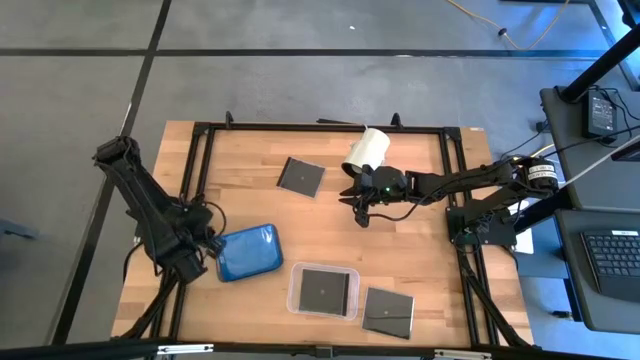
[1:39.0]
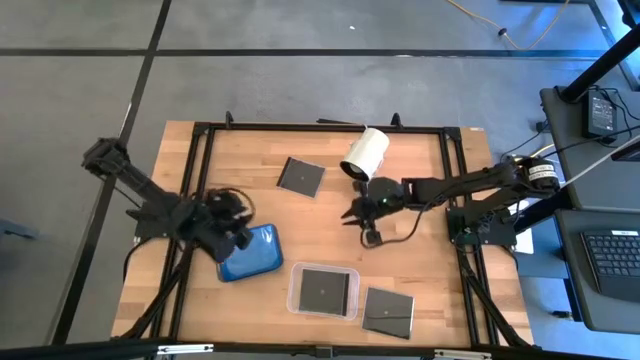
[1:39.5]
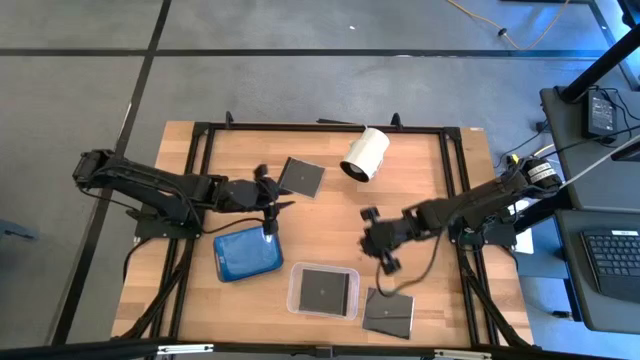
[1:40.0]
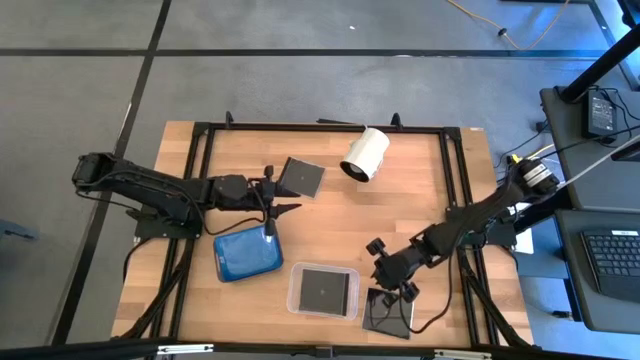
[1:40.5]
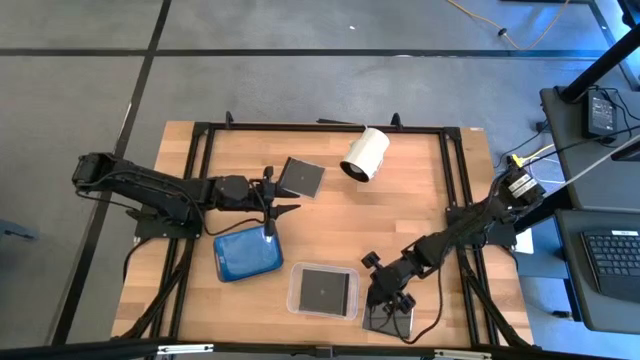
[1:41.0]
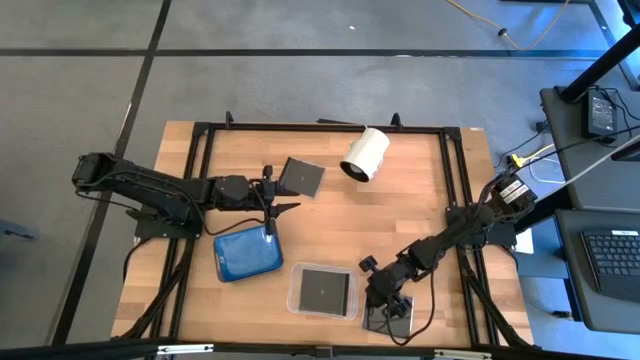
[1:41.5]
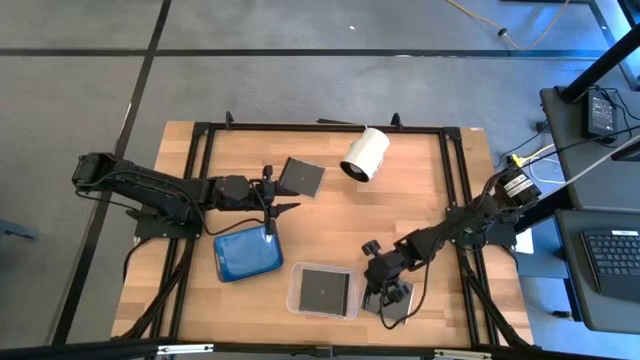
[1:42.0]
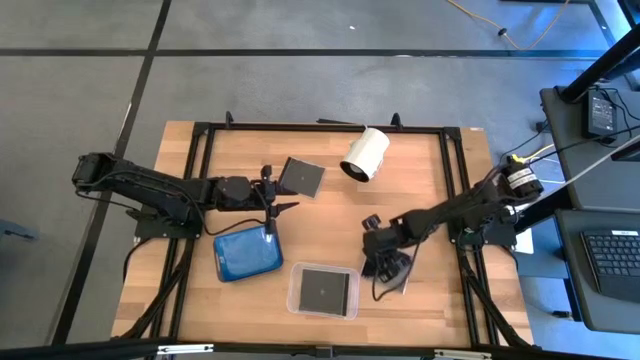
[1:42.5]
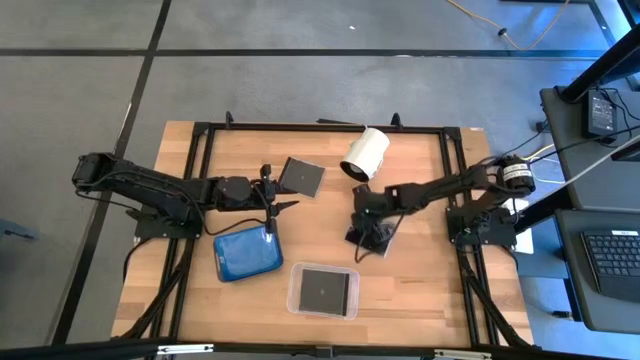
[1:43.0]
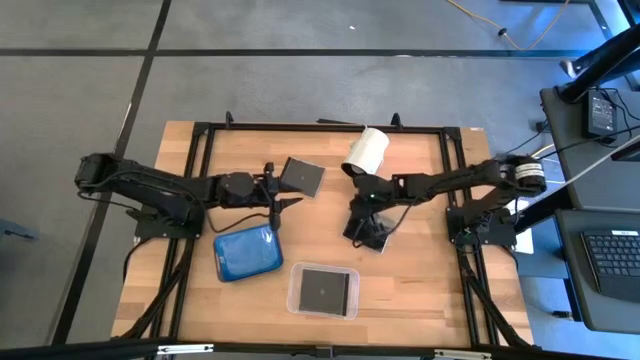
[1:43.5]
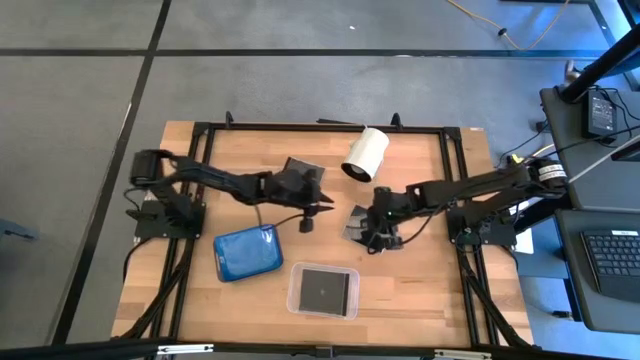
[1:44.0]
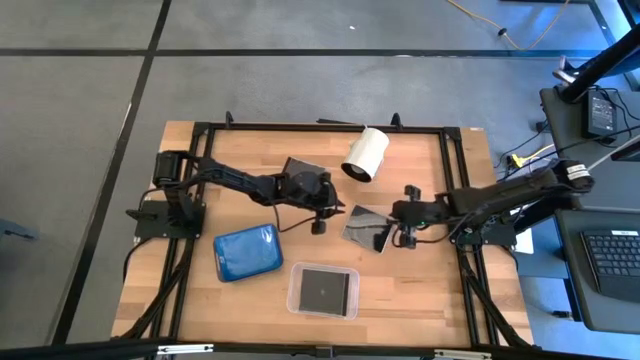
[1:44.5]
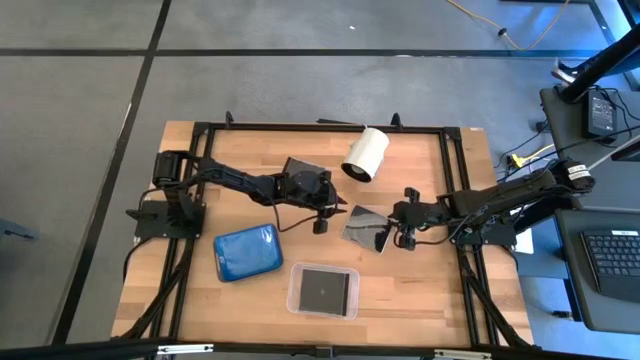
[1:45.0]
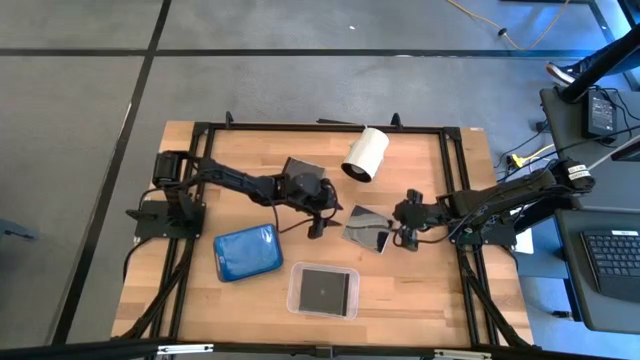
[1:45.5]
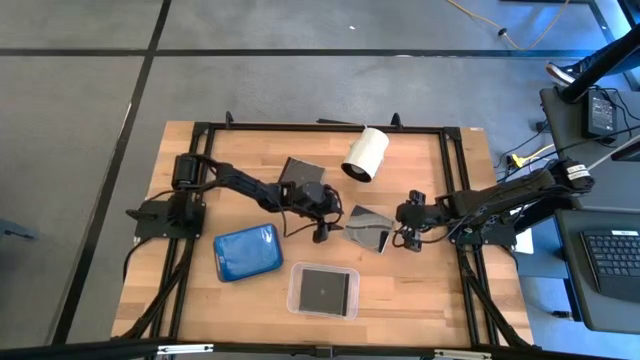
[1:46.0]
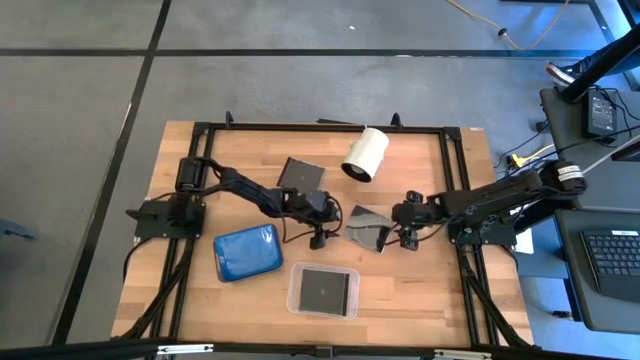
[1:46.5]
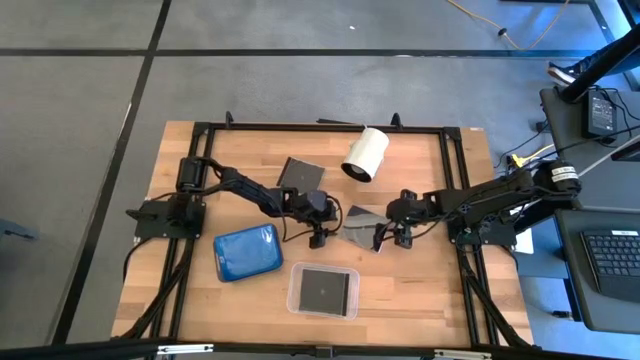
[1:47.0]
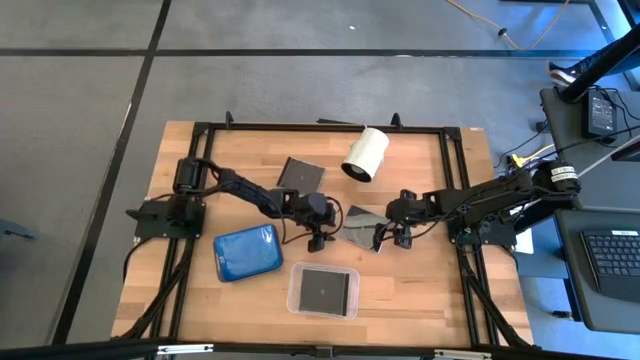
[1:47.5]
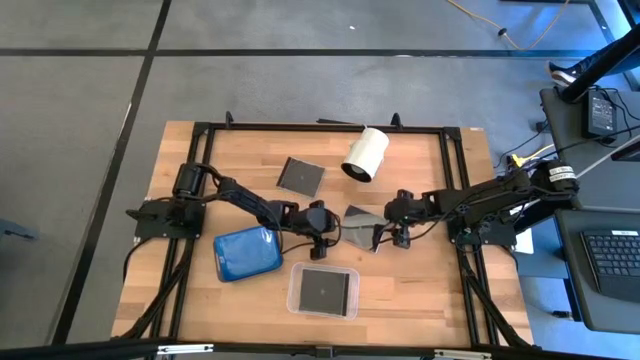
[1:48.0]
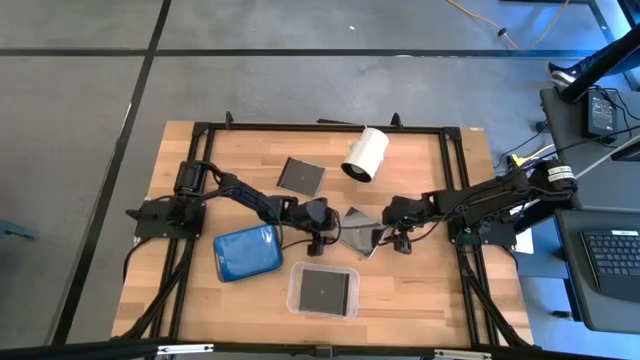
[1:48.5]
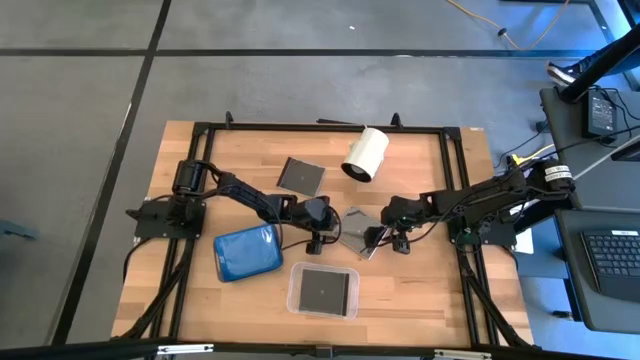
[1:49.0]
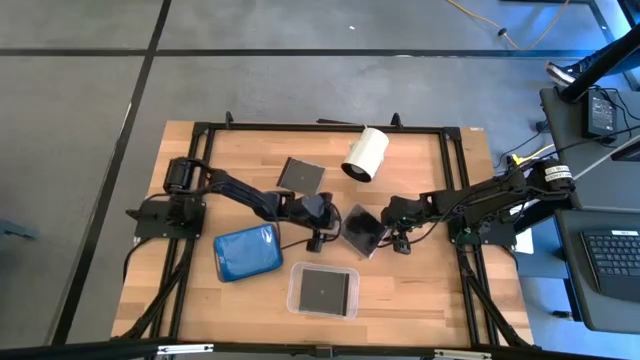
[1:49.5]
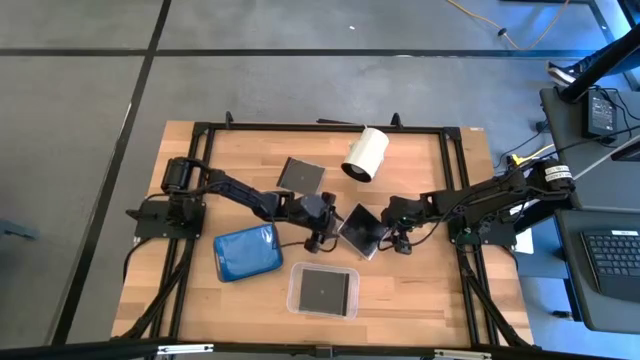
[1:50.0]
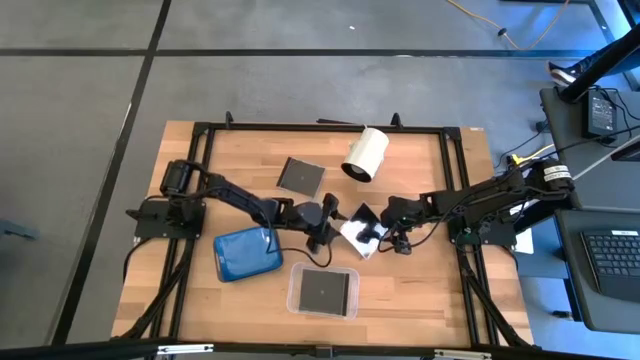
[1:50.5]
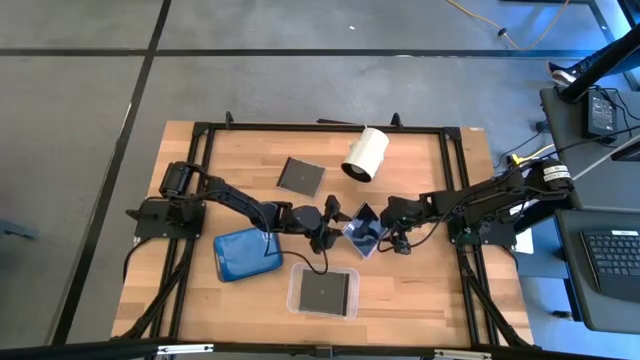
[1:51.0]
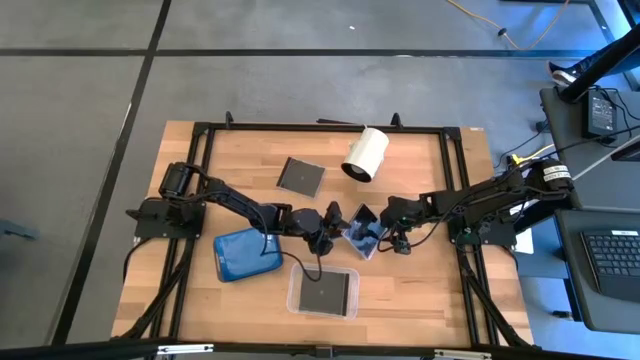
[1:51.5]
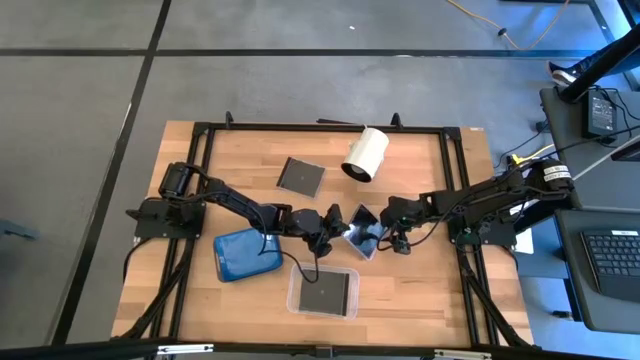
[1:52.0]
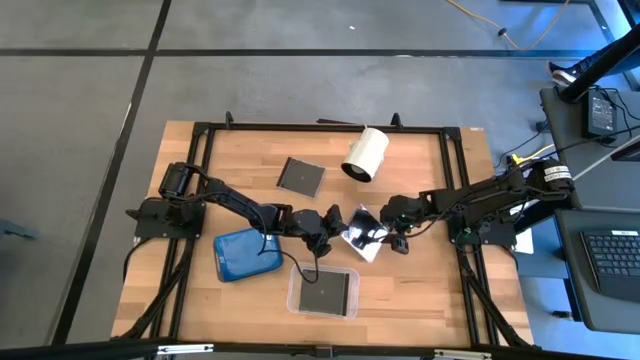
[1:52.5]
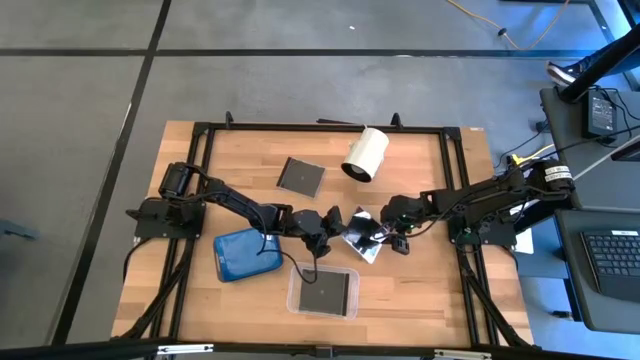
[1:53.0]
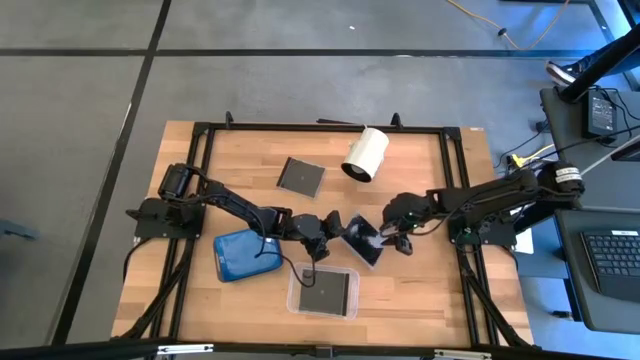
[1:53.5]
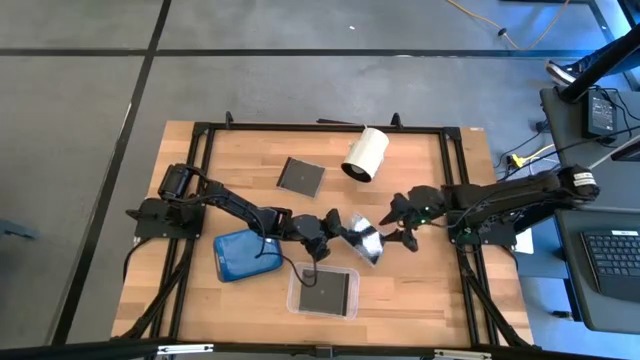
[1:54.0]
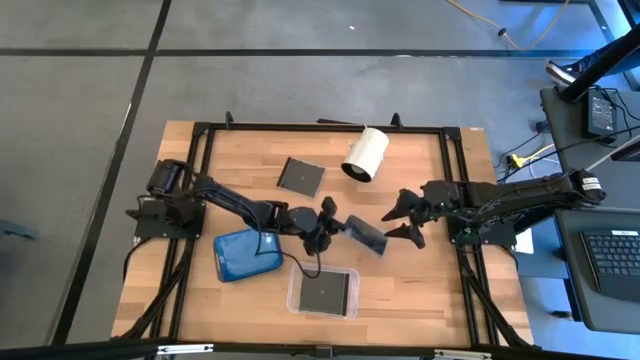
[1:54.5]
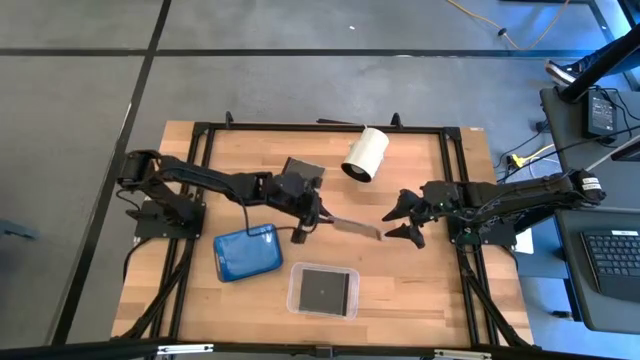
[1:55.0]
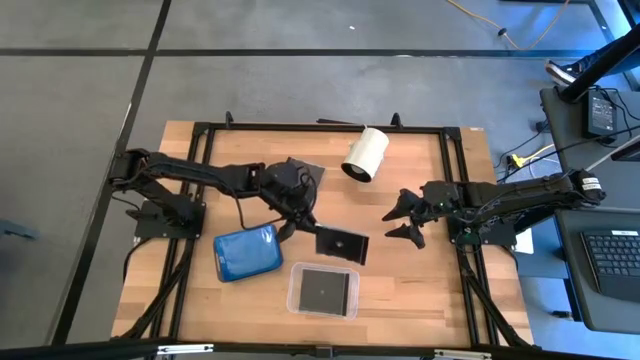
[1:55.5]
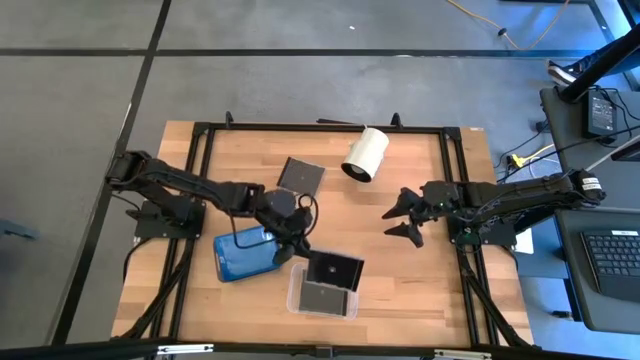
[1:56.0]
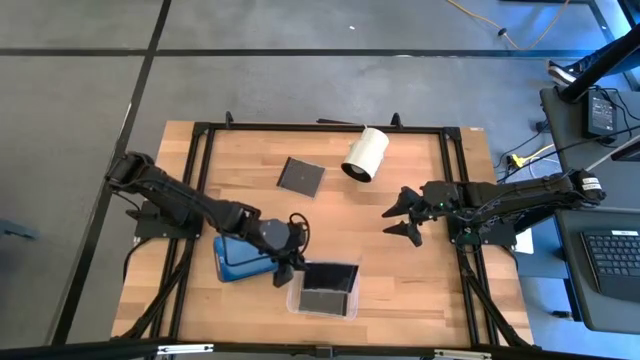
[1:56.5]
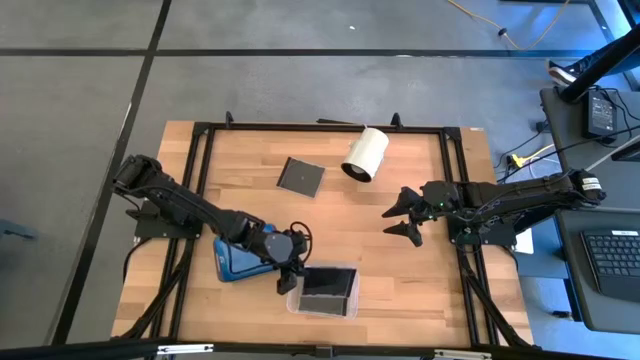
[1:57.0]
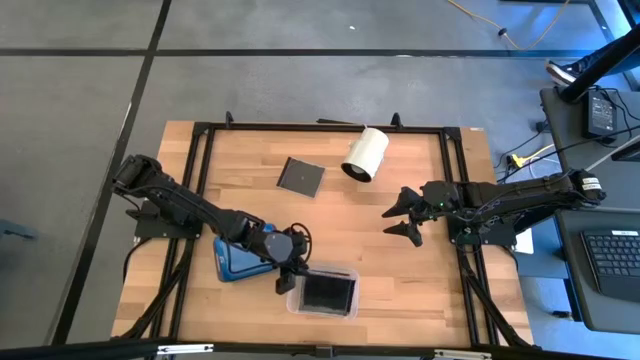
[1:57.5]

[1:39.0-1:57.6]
Task: Pick & place jewel cases by type
Put the bottom black CD case into the transparent bin

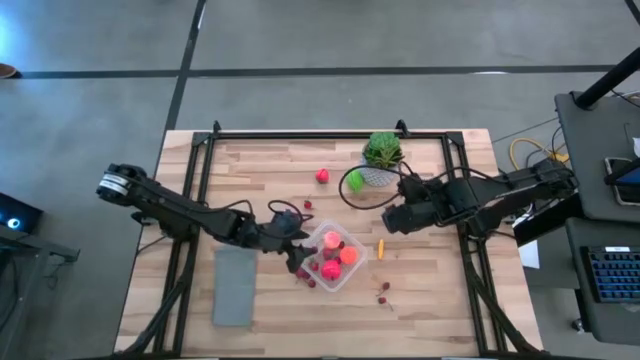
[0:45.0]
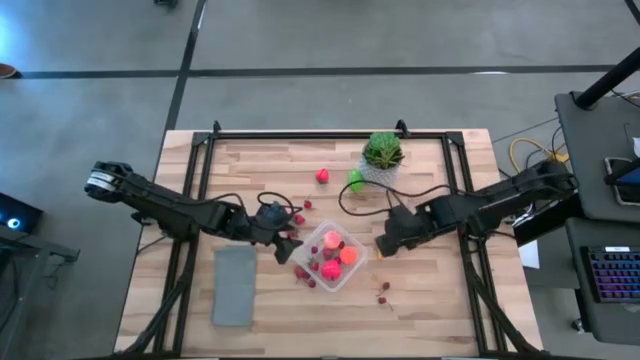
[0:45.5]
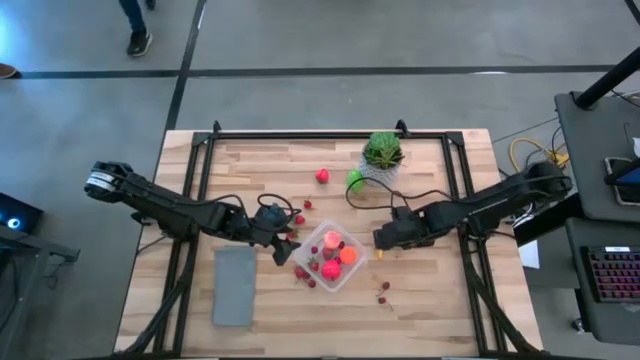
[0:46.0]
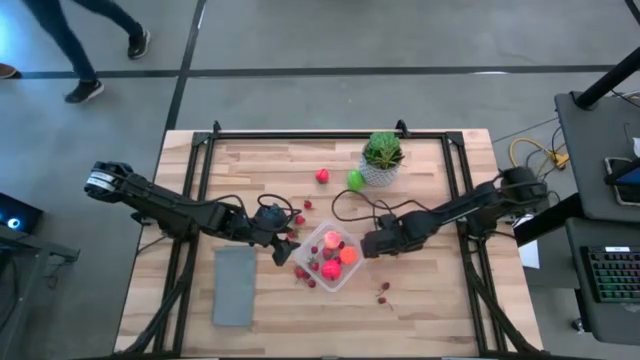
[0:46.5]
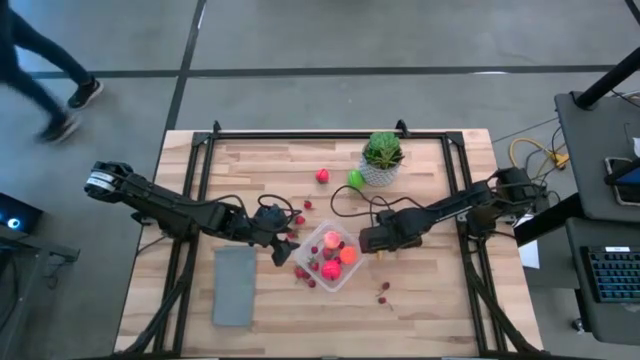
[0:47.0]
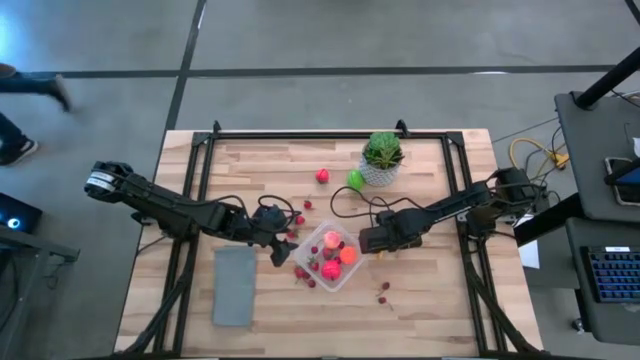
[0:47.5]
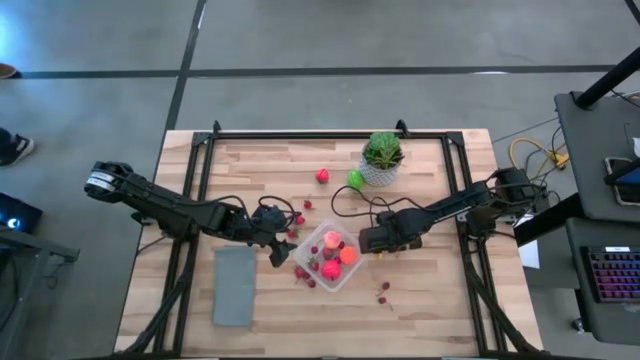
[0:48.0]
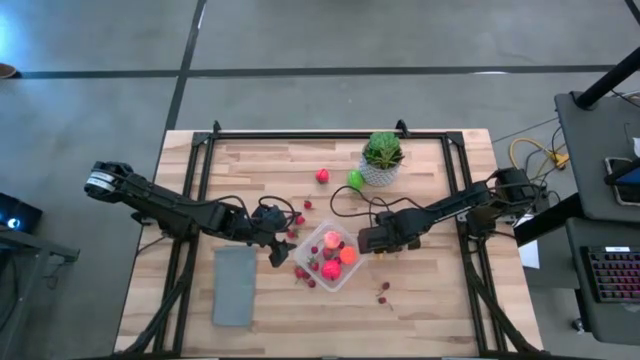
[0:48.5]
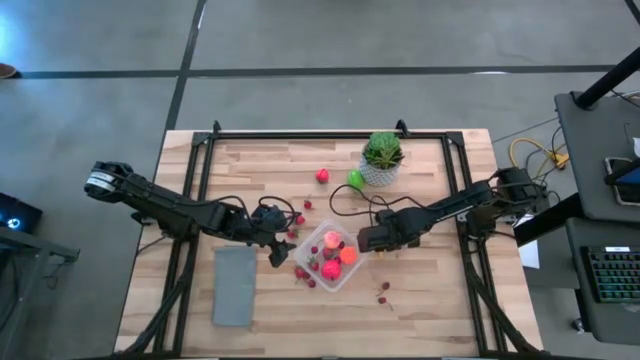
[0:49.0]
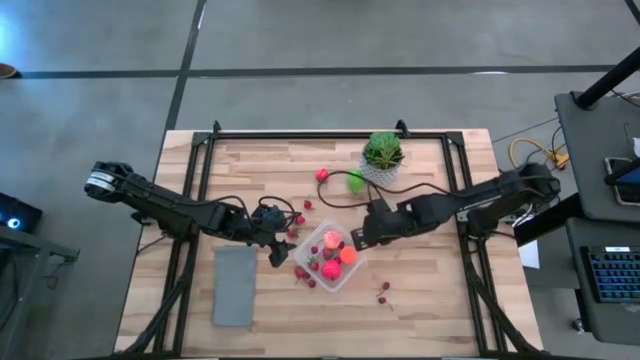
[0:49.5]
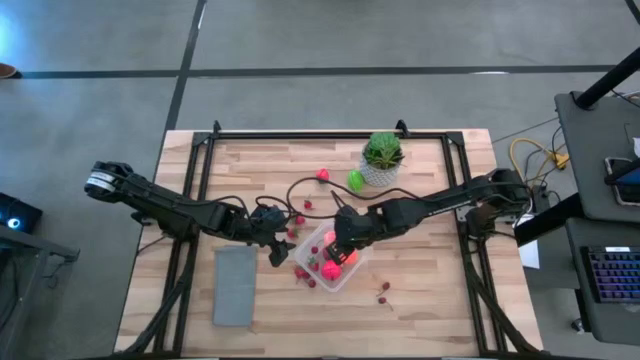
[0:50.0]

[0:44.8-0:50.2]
Task: Pick and placing Produce into tupperware
Put the yellow squash into the transparent bin
